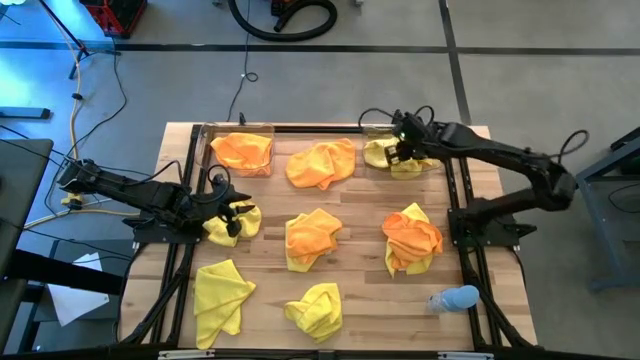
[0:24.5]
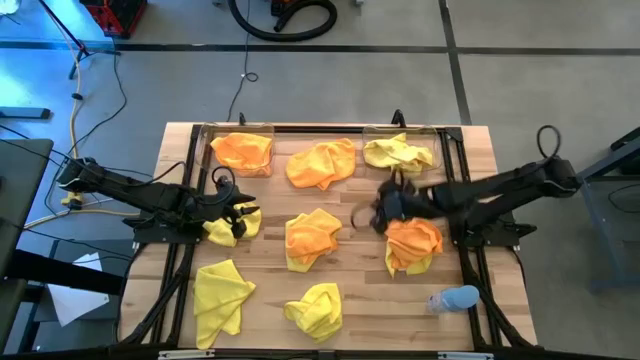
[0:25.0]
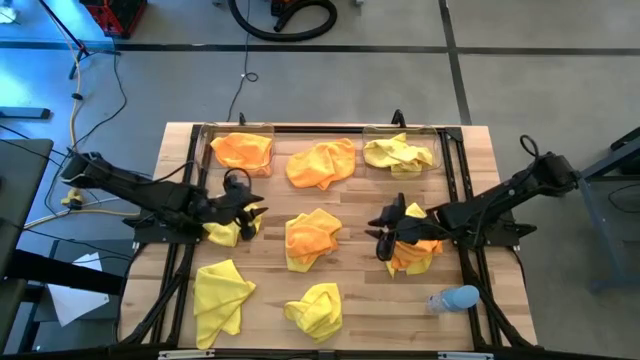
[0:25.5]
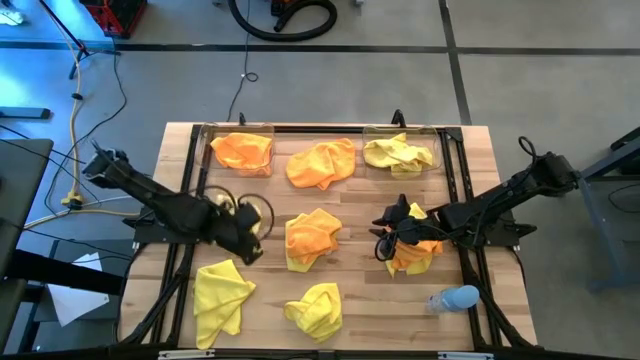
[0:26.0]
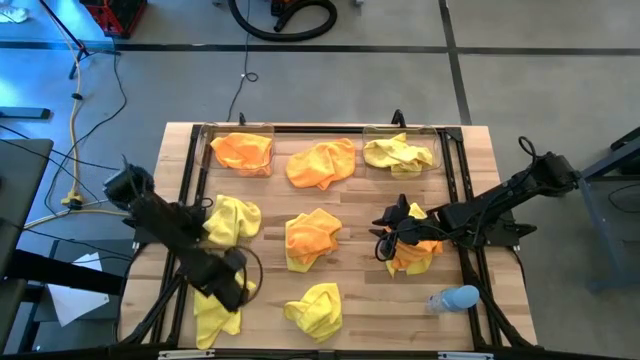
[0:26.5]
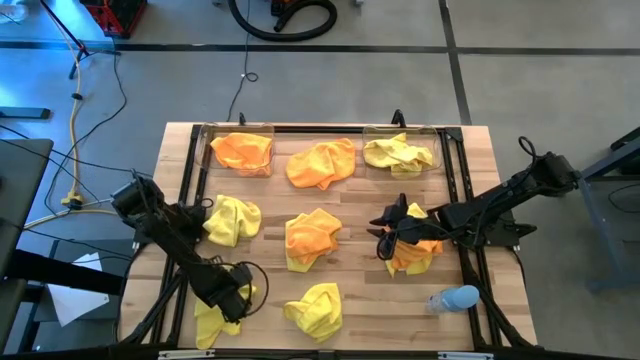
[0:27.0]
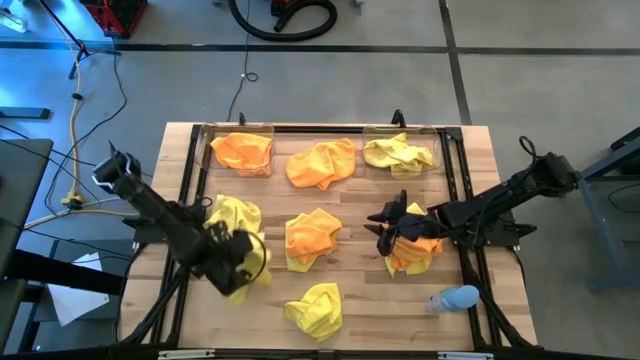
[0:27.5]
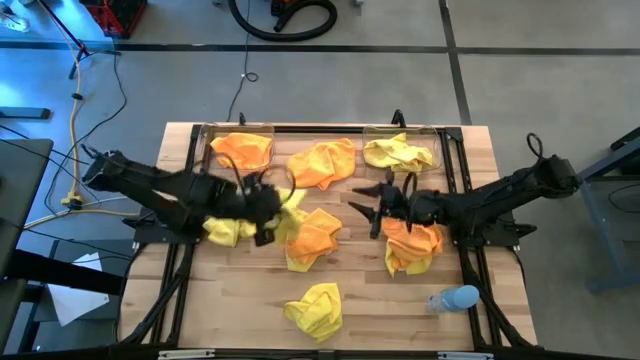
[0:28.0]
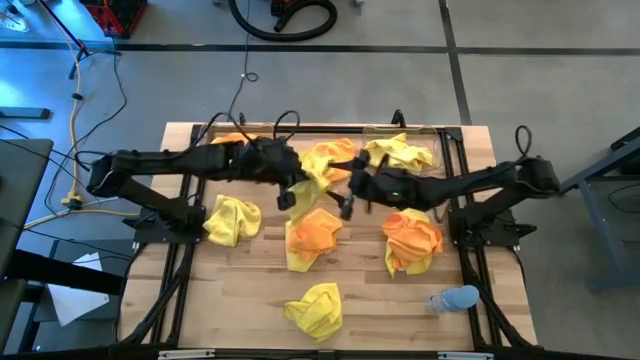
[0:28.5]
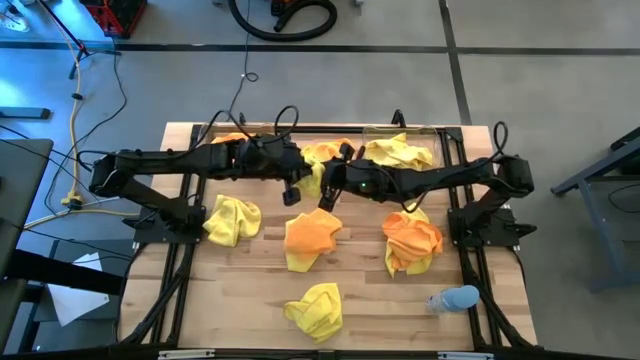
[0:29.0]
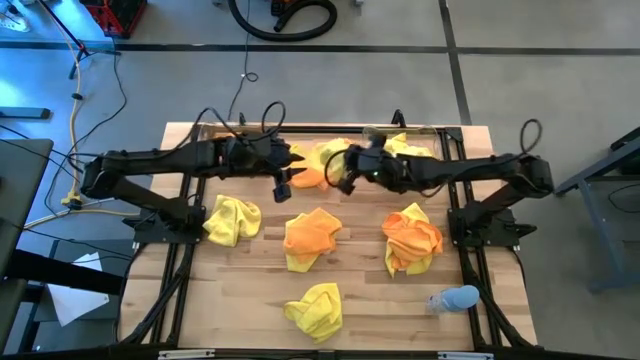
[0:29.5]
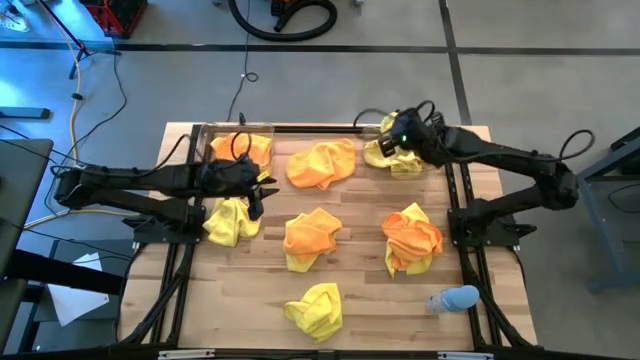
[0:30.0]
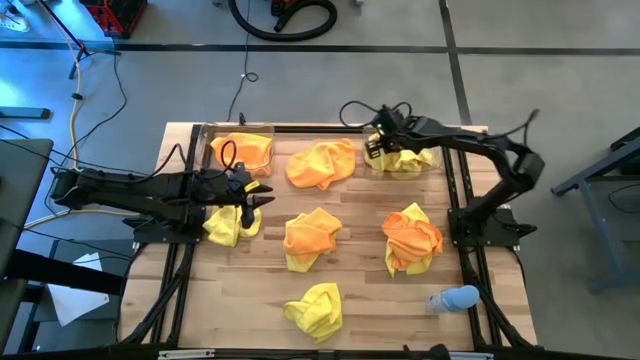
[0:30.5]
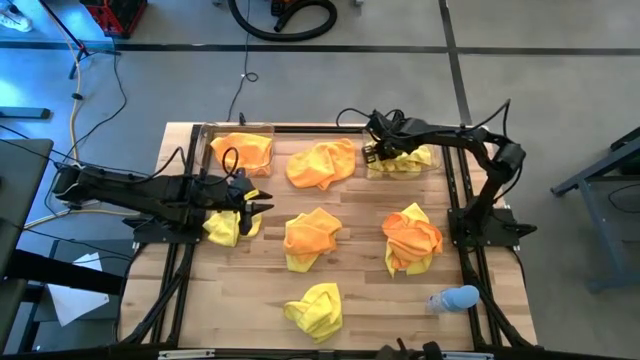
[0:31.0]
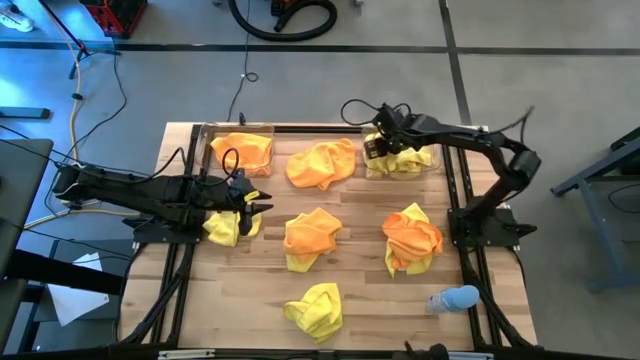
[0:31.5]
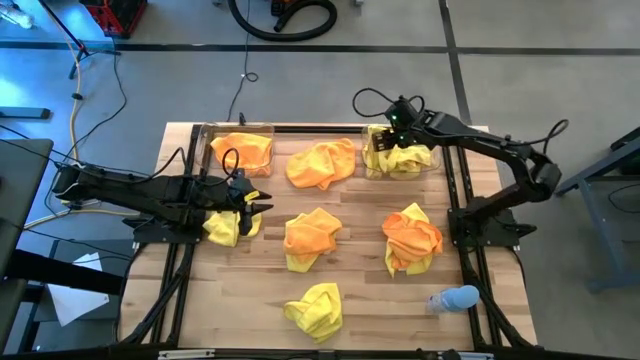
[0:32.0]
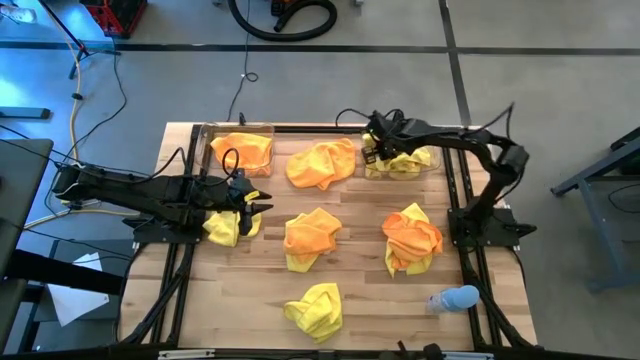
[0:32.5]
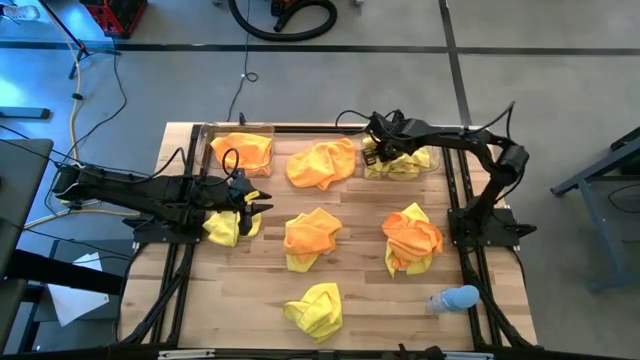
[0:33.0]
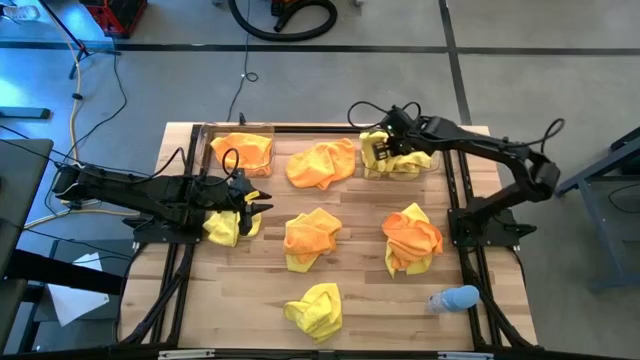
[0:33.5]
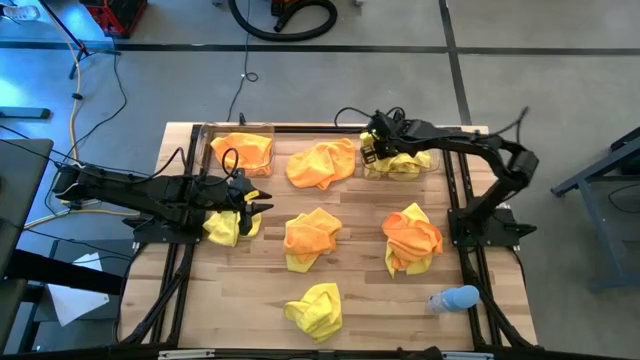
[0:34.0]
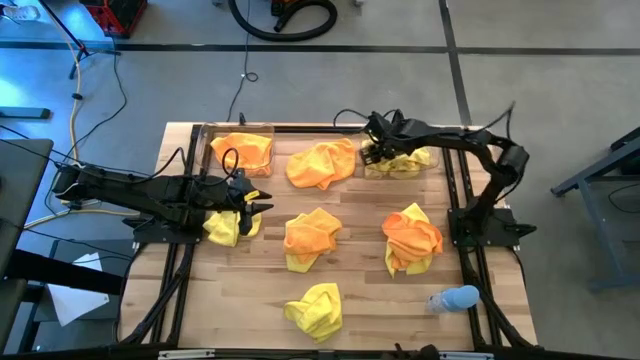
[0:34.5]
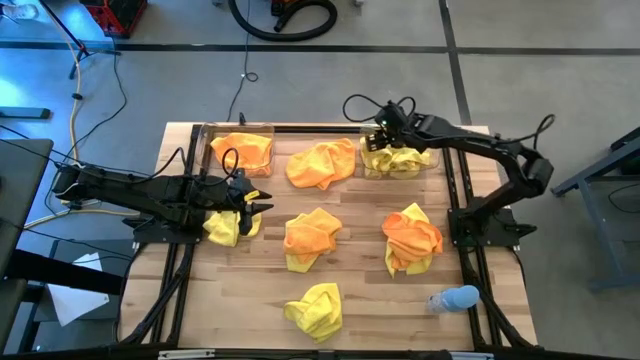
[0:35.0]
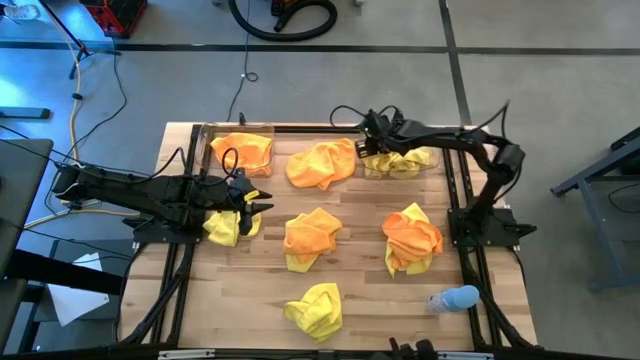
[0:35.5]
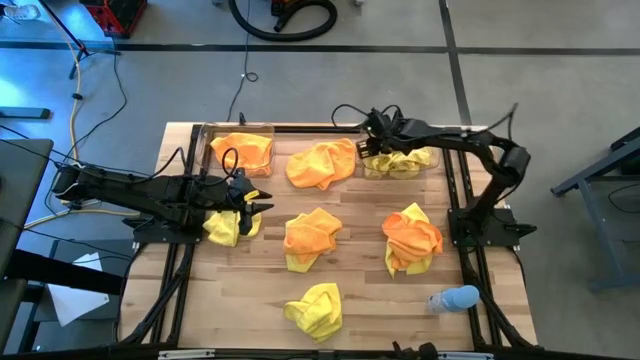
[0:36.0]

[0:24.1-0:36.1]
Task: Sort microfiber towel by color & place in baskets
Put the bottom left yellow microfiber cloth into the right transparent bin

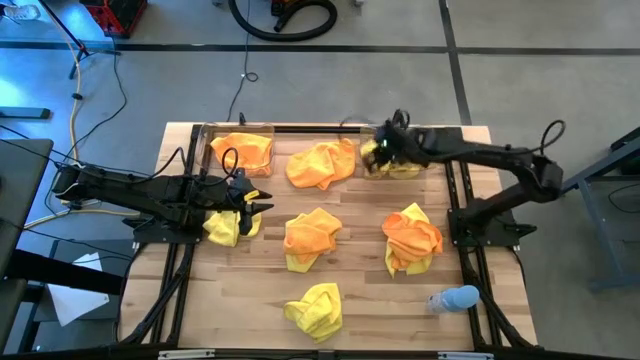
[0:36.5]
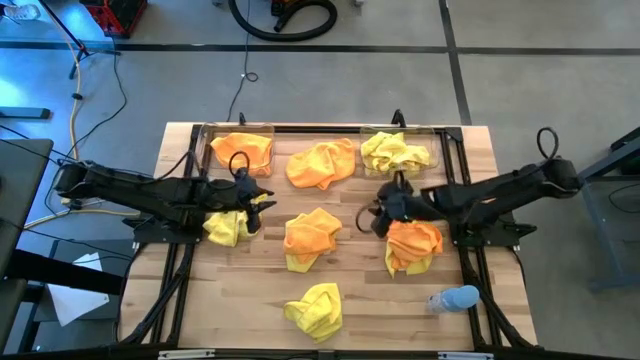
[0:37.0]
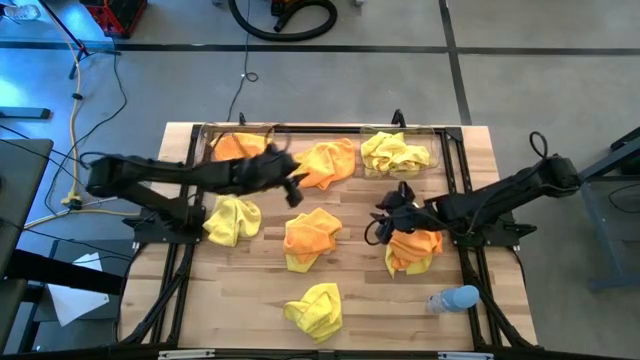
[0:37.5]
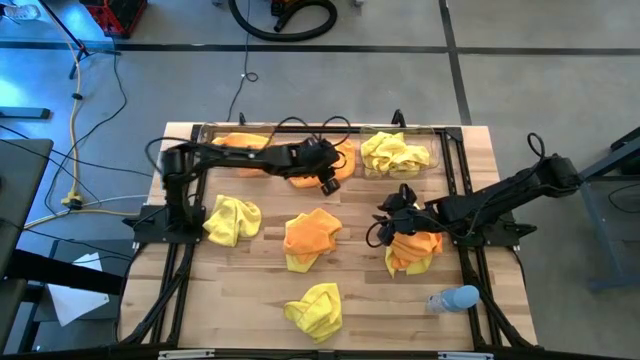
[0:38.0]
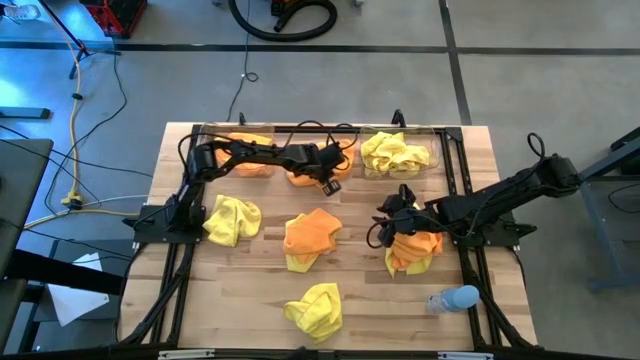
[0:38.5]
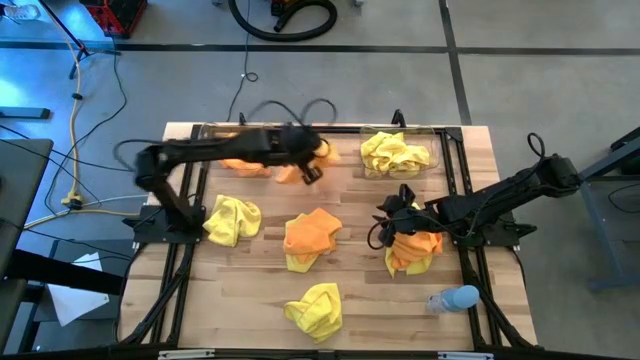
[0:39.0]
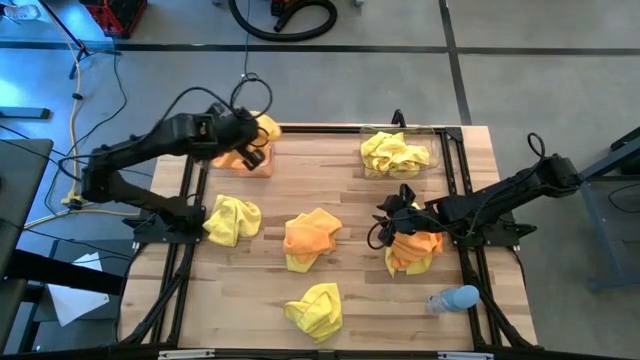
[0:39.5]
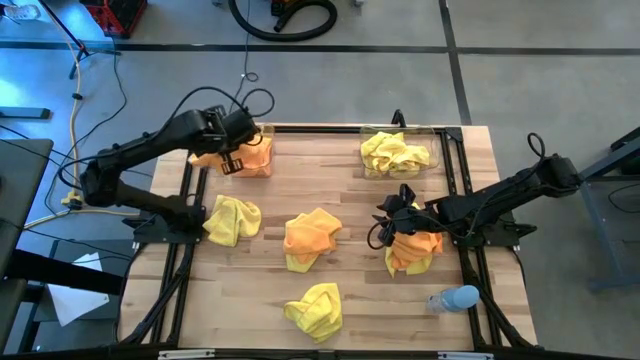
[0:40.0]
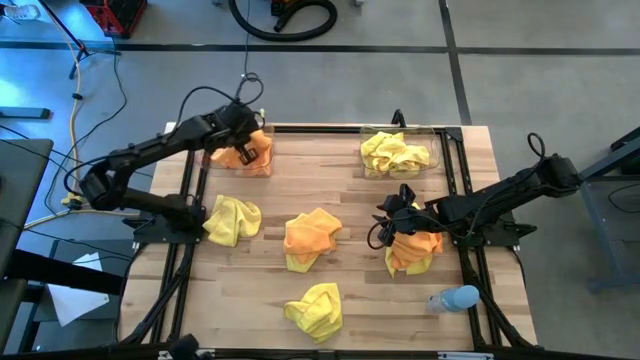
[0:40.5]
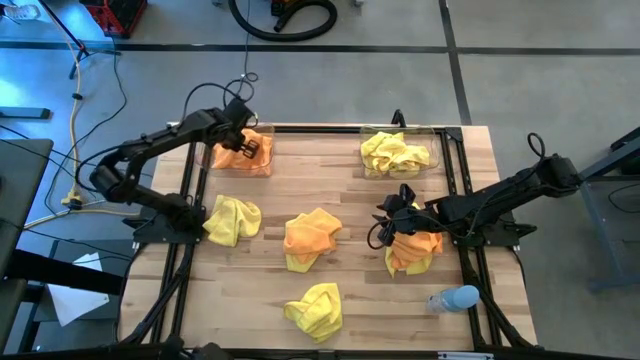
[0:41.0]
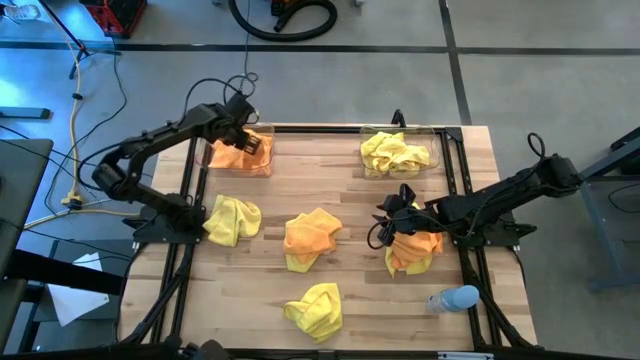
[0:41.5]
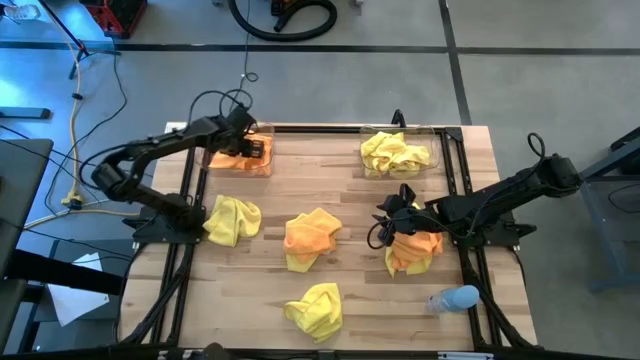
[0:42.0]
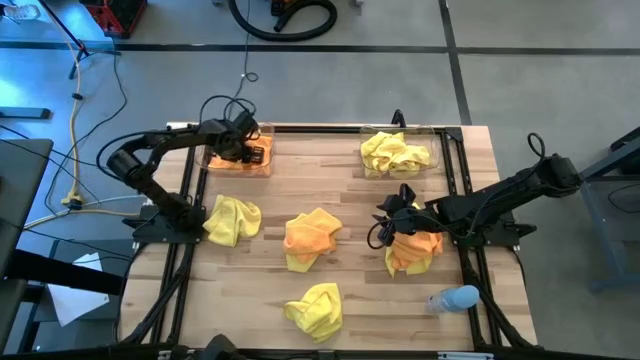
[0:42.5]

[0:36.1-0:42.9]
Put the top orange microfiber cloth into the left transparent bin

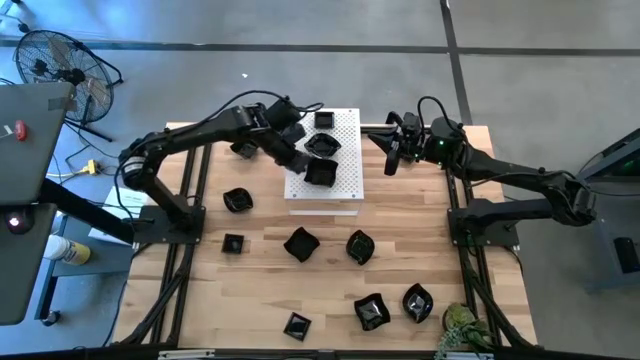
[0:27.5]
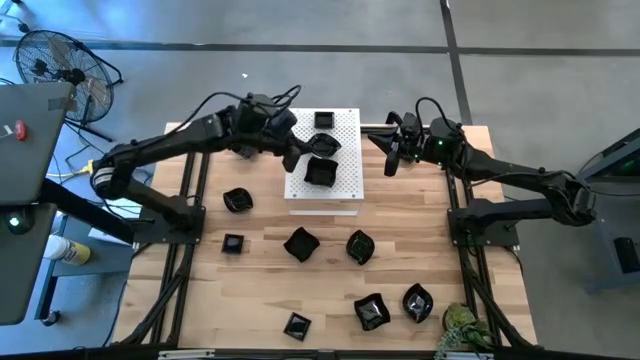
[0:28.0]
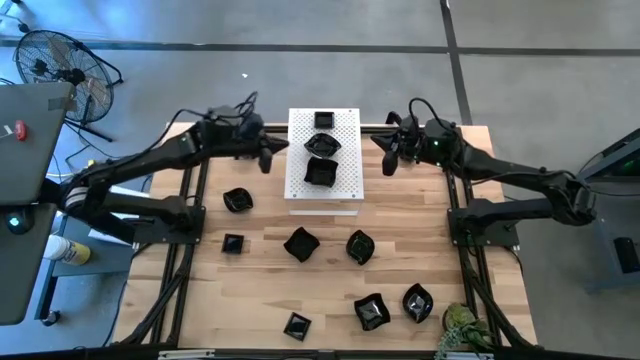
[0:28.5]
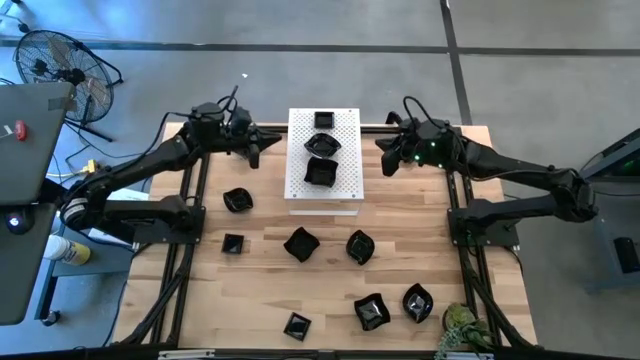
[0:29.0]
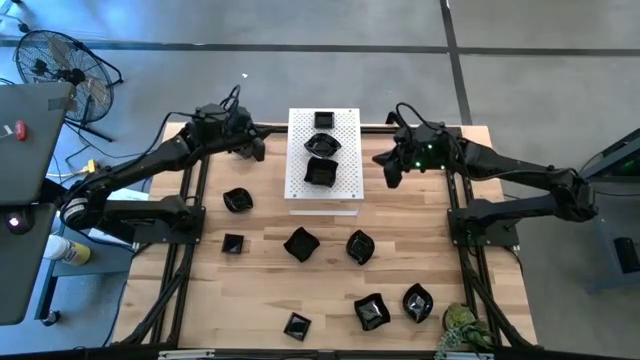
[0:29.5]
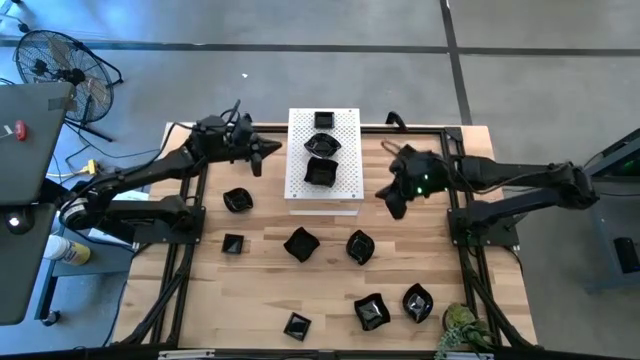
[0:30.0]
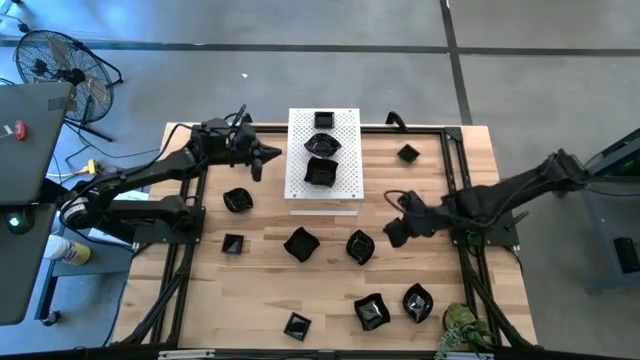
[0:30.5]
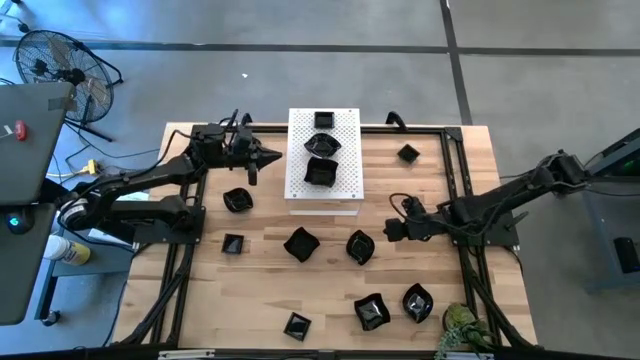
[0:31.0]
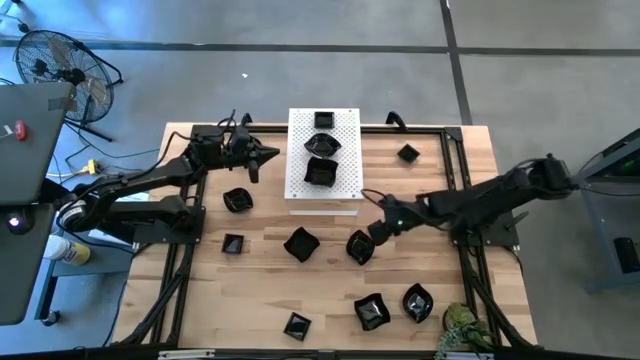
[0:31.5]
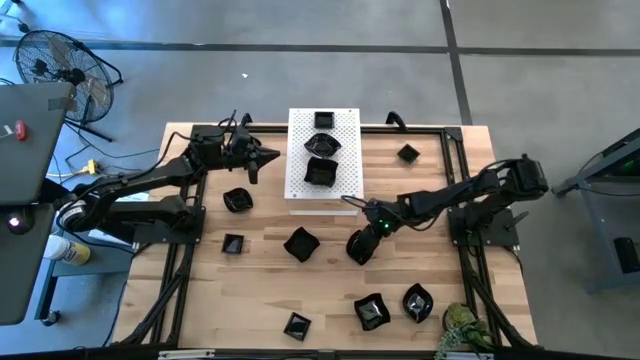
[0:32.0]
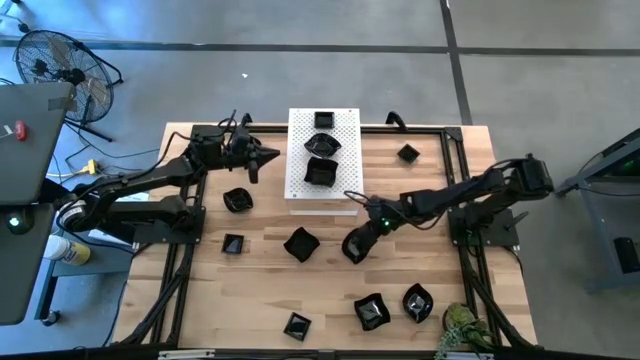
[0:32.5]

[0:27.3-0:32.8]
Task: Pick & Place Mini shaped plates
Stack the black leaf shaped plate on top of the black leaf shaped plate on the shelf
